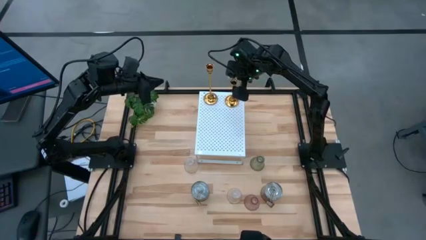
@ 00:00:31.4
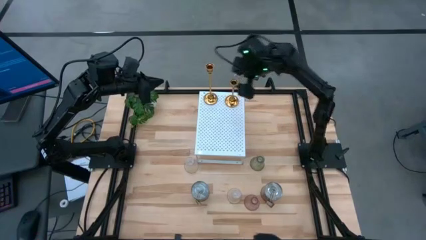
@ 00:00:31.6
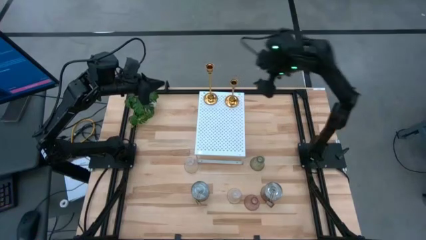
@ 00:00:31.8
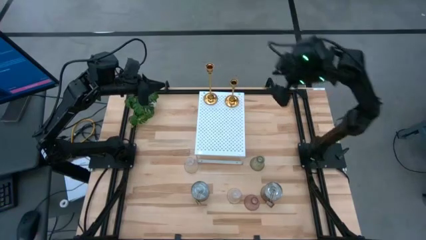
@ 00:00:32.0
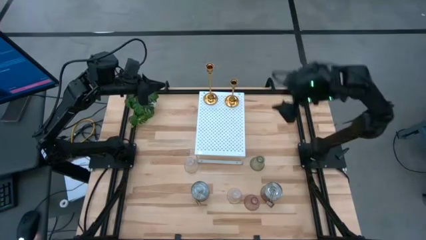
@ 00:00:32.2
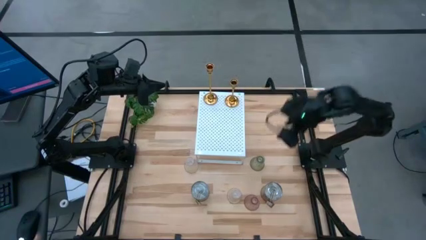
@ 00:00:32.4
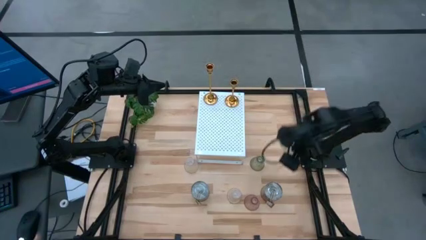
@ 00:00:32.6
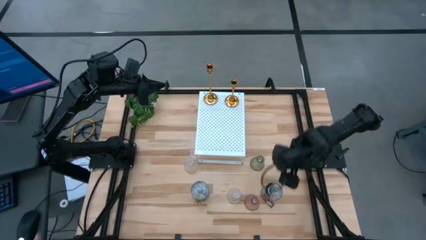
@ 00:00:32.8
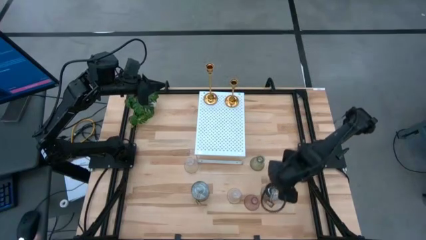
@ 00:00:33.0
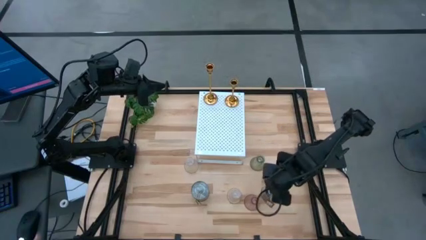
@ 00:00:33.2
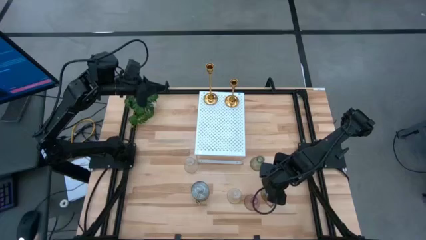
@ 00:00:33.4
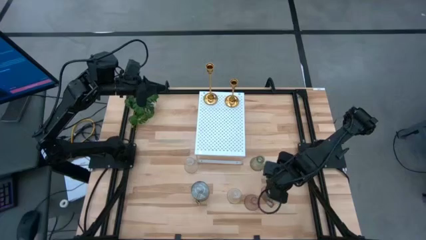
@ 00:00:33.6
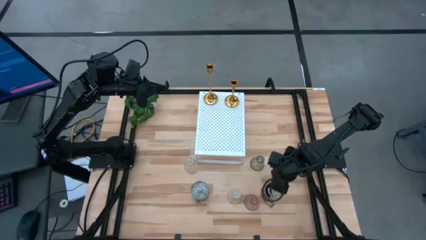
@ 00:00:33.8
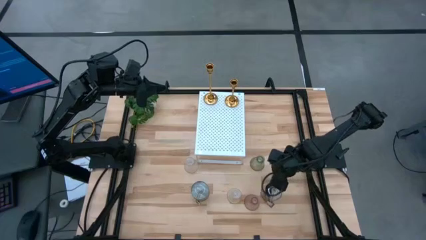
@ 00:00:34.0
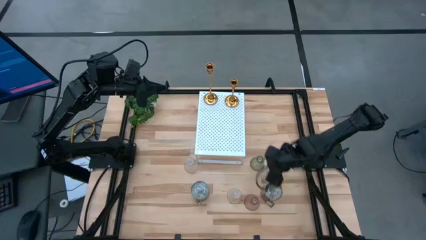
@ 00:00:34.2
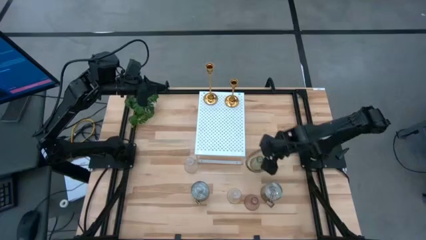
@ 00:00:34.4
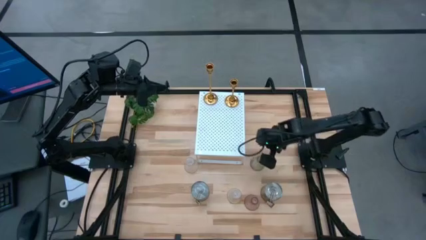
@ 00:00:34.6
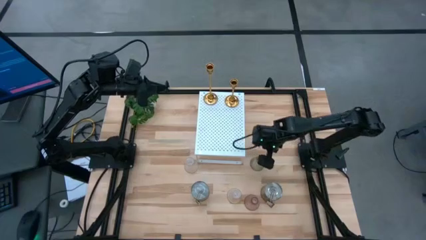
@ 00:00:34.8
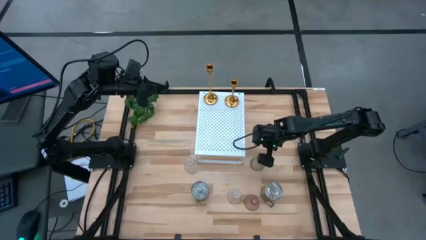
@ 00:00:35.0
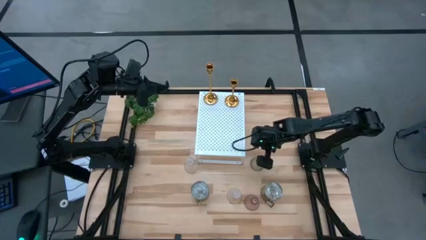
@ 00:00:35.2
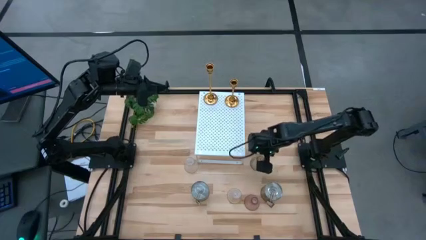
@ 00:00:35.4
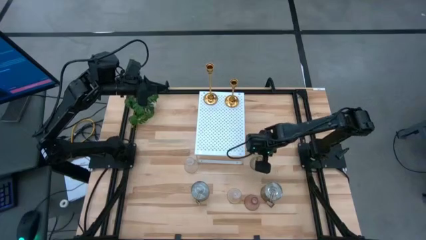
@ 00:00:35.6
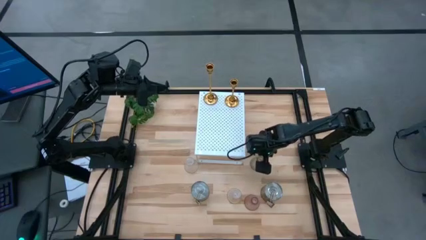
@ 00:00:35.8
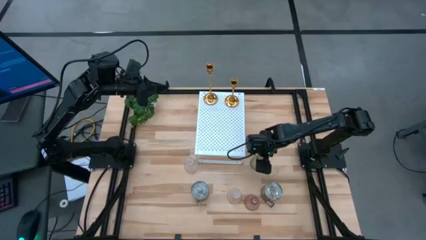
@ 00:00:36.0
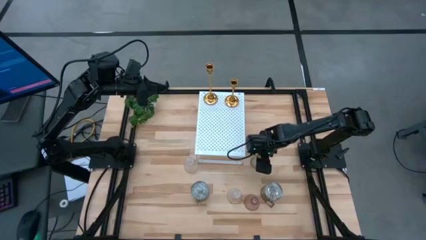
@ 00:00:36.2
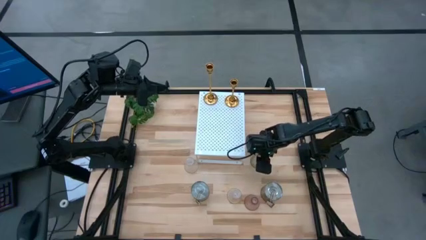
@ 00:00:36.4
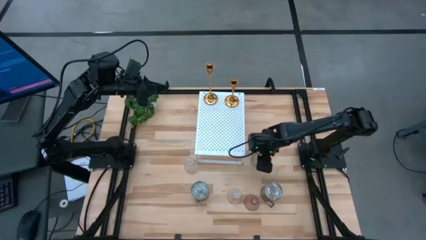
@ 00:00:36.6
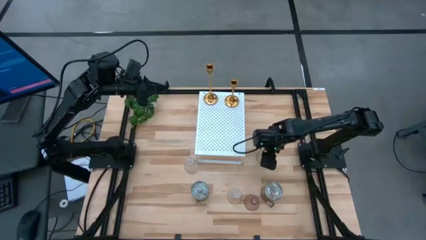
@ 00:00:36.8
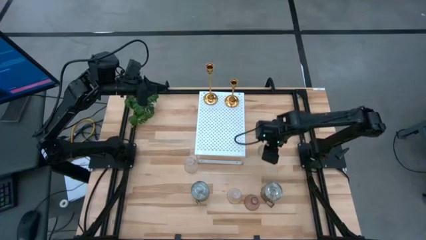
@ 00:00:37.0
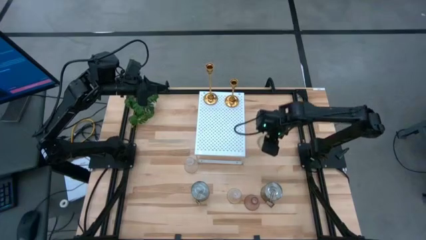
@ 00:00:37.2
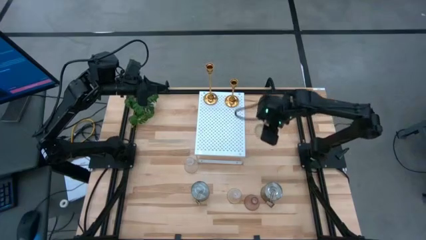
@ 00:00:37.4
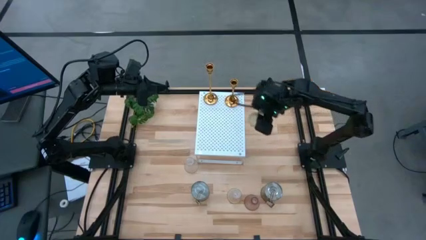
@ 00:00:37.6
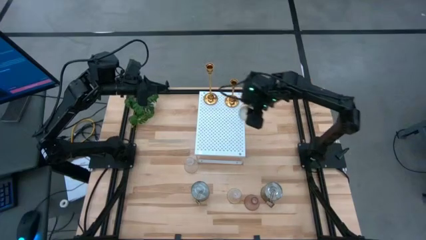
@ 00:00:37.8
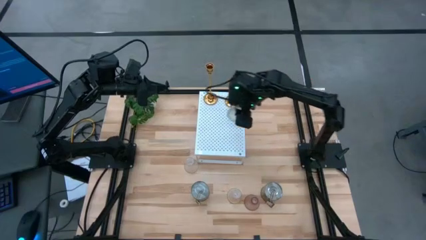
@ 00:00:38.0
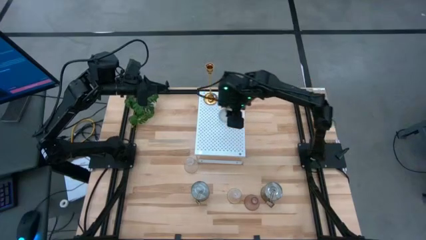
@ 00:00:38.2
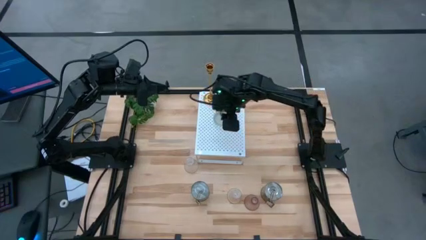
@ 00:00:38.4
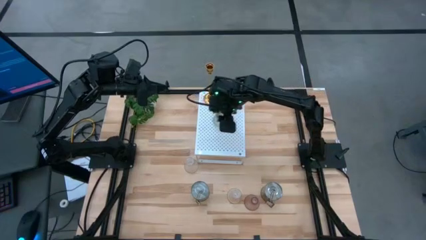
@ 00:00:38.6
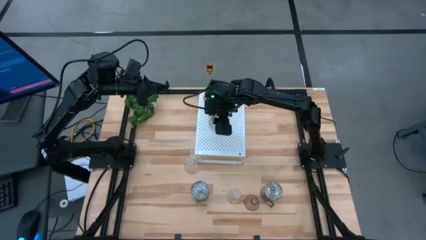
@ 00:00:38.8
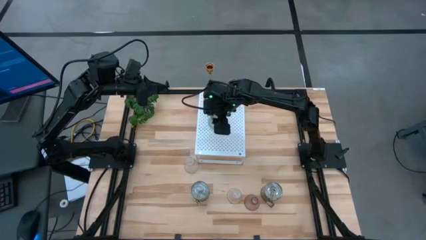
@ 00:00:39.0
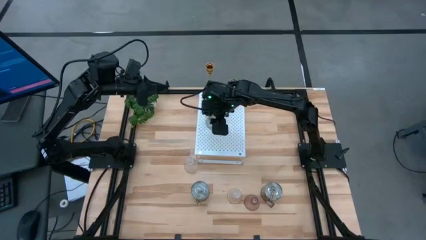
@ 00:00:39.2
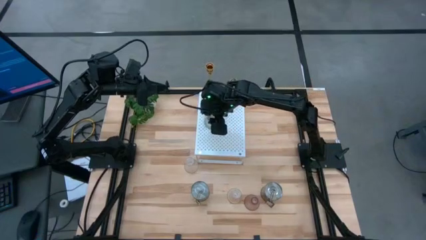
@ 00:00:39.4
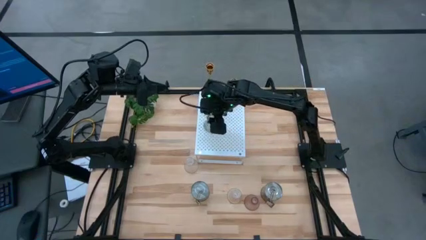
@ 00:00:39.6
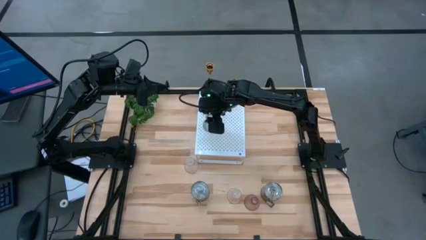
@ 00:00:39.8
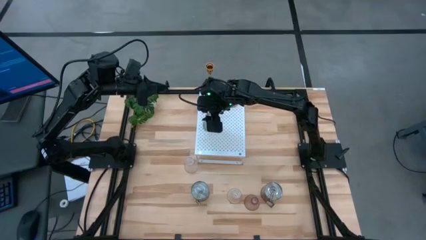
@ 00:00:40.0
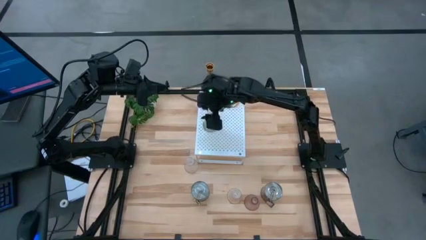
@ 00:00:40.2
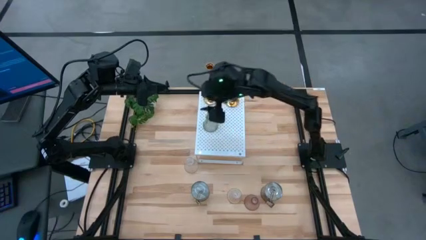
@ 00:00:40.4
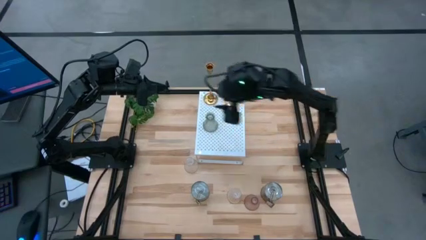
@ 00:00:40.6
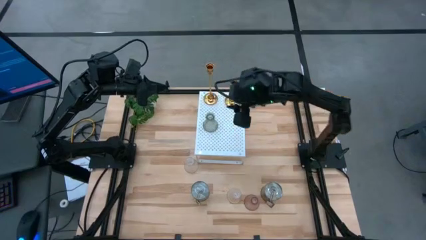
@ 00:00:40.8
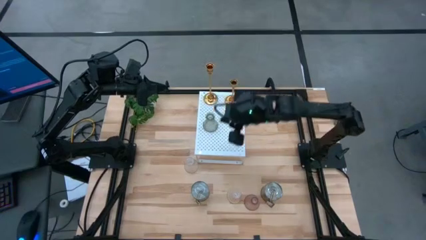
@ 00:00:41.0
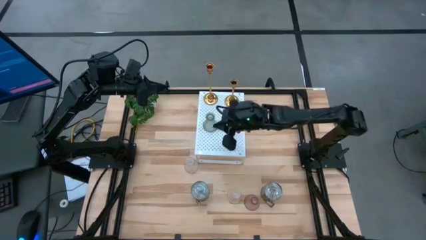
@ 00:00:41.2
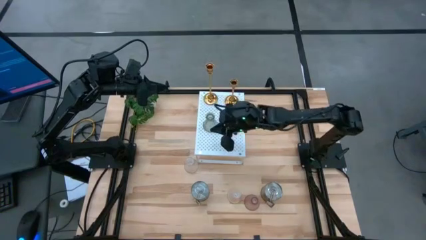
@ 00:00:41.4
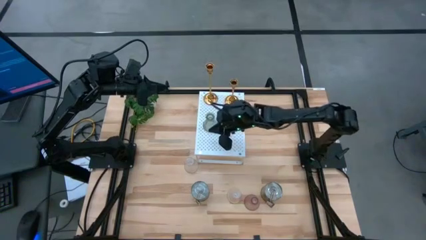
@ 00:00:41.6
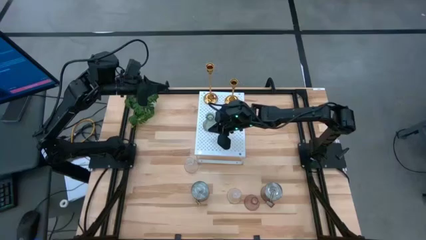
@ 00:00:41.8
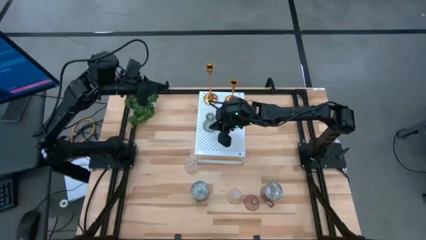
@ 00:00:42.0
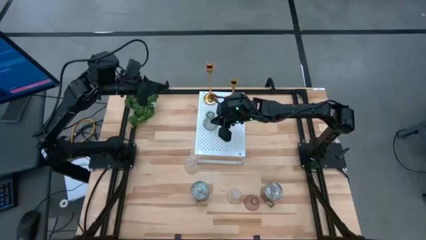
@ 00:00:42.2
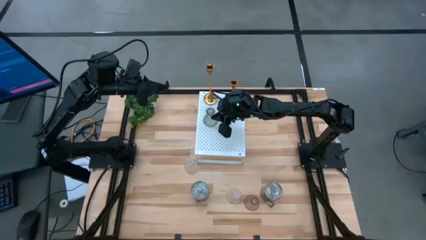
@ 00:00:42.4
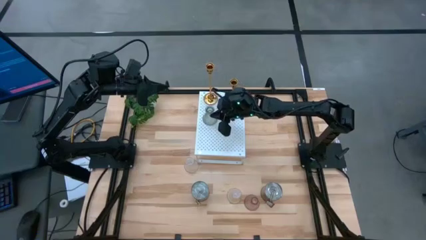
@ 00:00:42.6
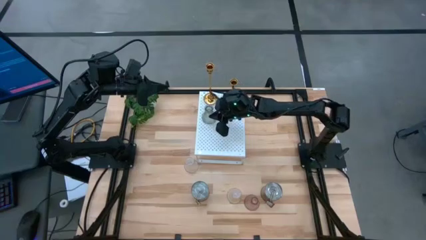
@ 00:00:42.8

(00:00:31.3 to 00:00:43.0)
Task: Pick & Place candle stick holders
Put the green glass candle holder on the shelf
